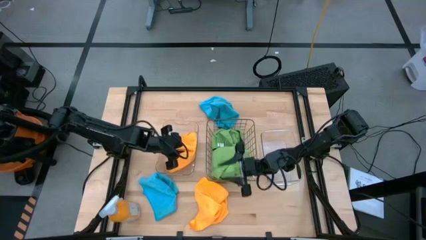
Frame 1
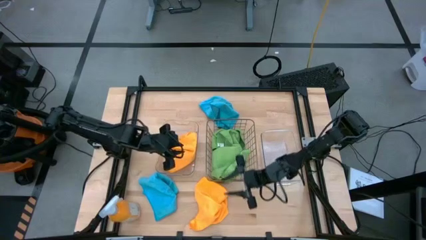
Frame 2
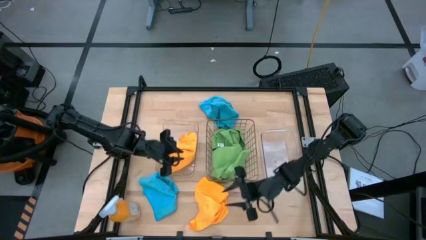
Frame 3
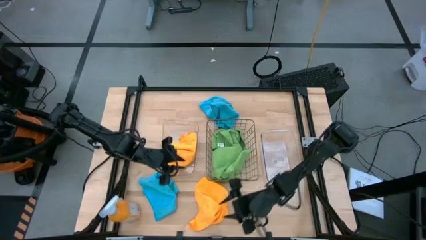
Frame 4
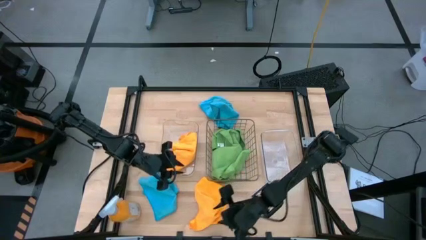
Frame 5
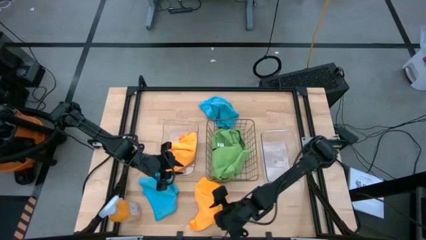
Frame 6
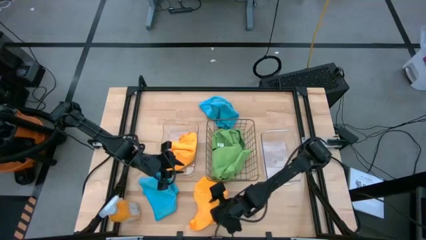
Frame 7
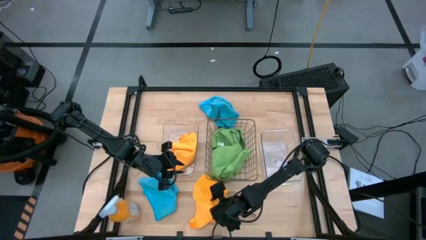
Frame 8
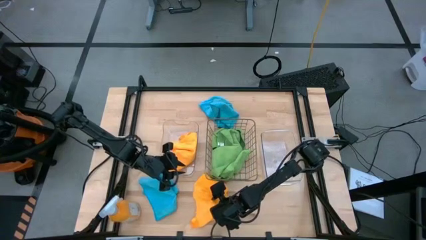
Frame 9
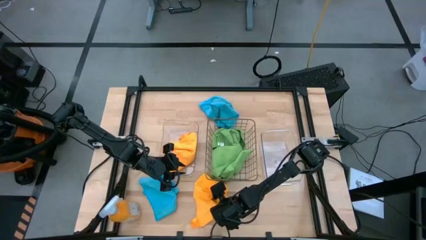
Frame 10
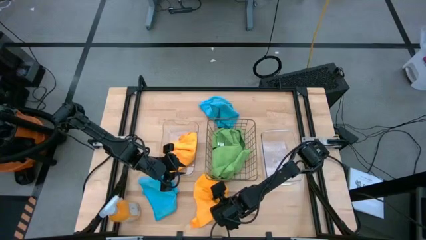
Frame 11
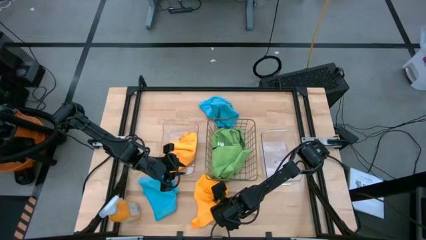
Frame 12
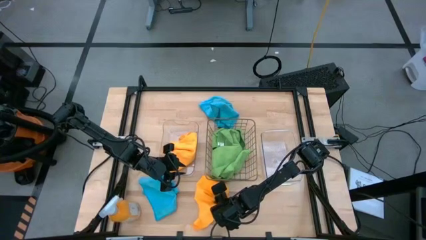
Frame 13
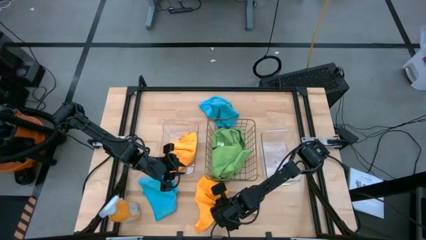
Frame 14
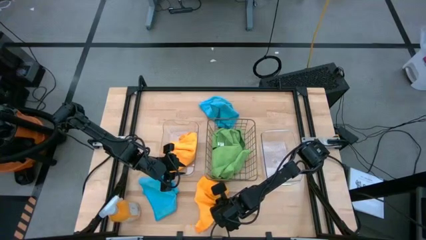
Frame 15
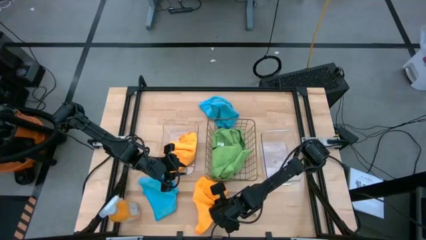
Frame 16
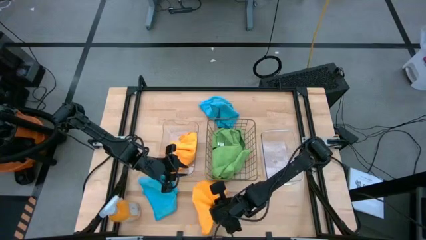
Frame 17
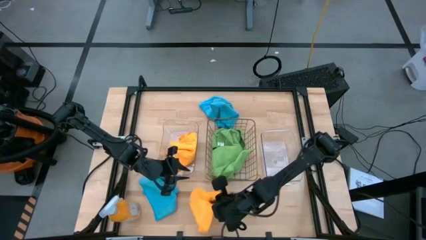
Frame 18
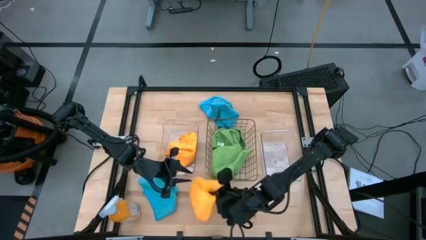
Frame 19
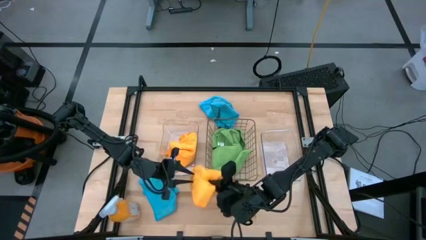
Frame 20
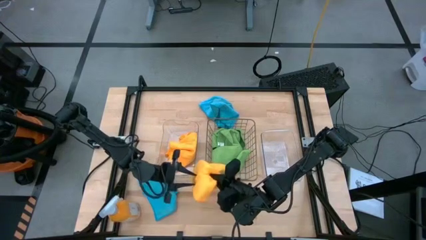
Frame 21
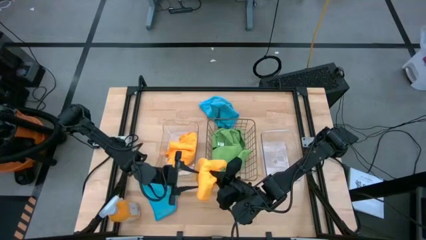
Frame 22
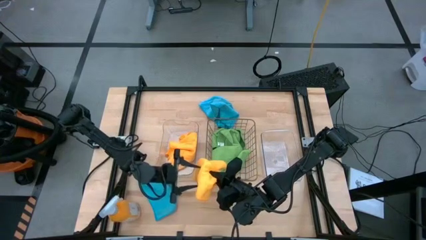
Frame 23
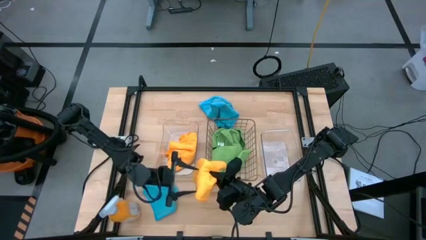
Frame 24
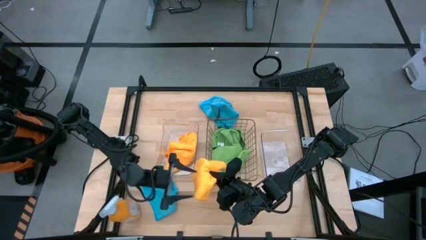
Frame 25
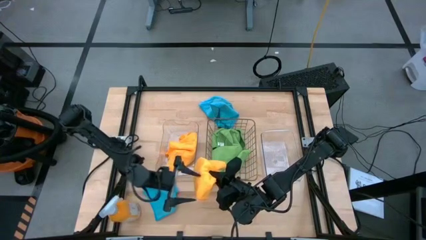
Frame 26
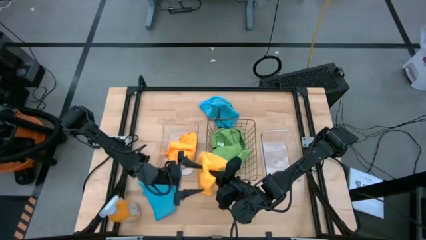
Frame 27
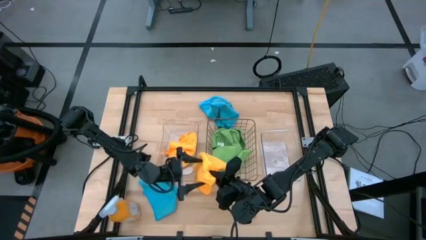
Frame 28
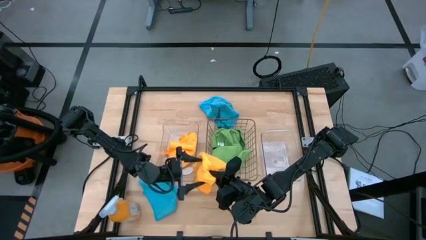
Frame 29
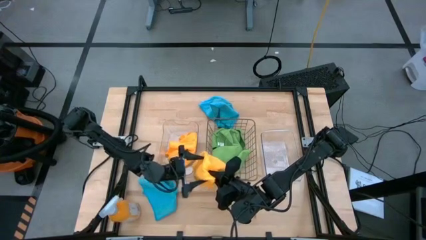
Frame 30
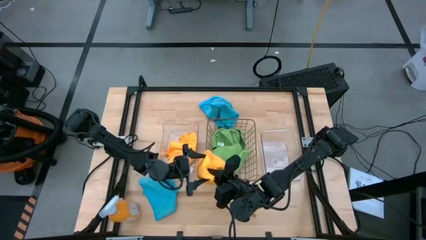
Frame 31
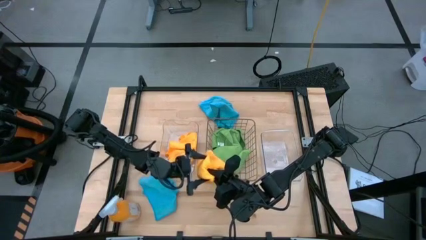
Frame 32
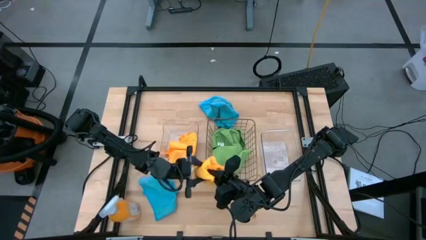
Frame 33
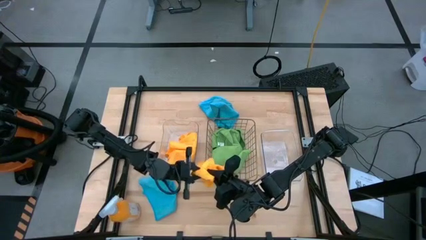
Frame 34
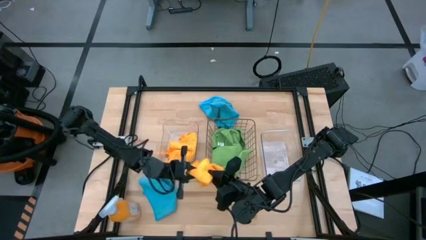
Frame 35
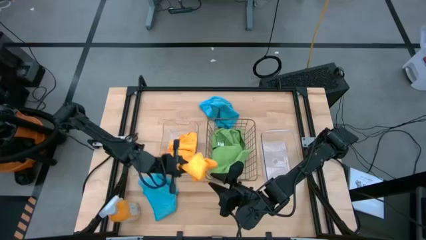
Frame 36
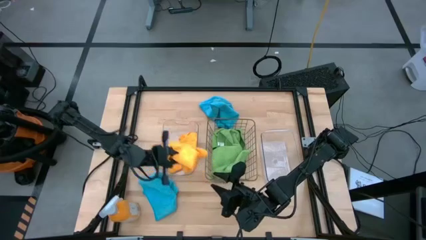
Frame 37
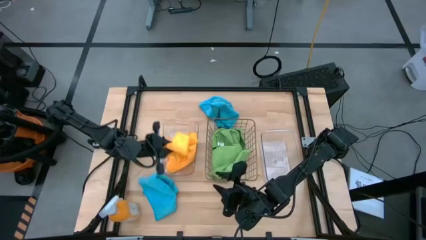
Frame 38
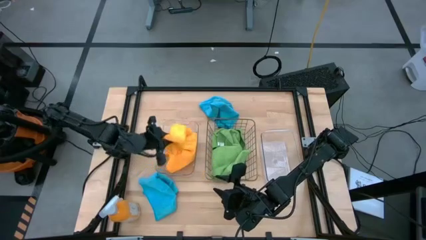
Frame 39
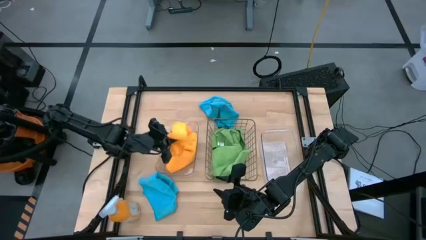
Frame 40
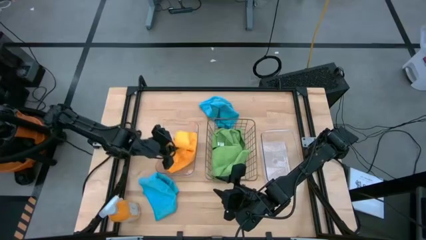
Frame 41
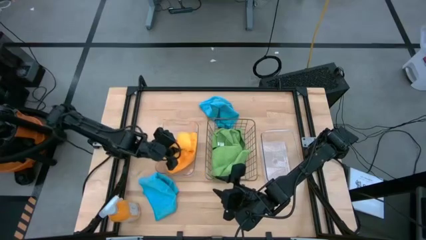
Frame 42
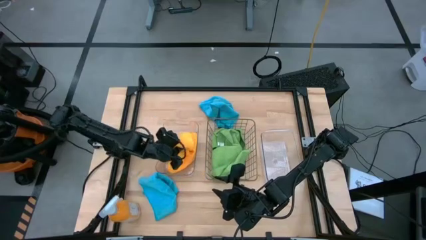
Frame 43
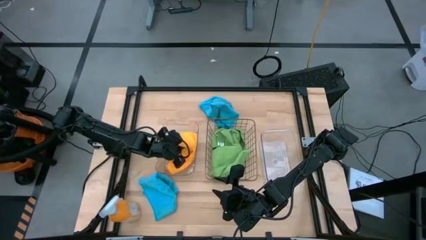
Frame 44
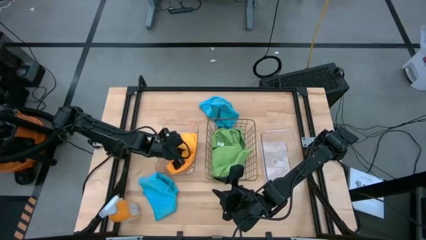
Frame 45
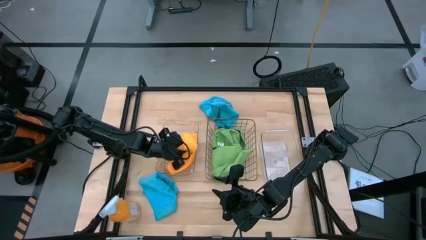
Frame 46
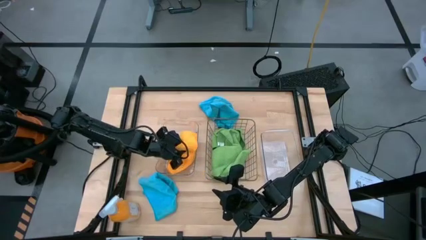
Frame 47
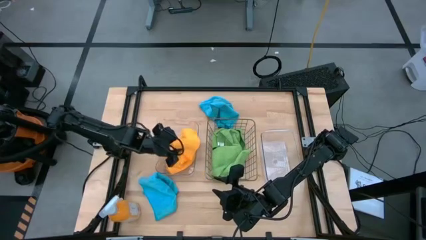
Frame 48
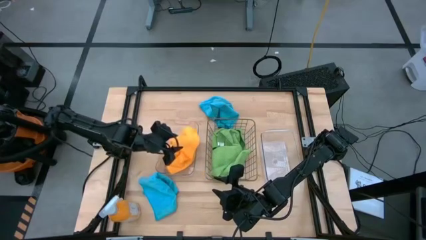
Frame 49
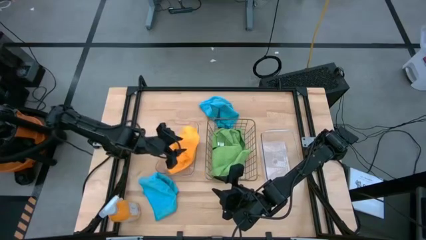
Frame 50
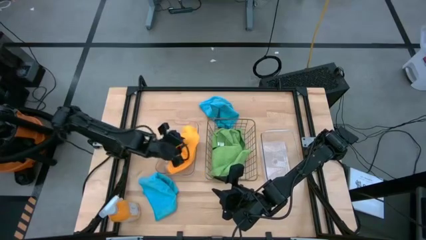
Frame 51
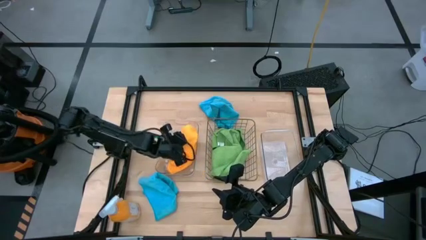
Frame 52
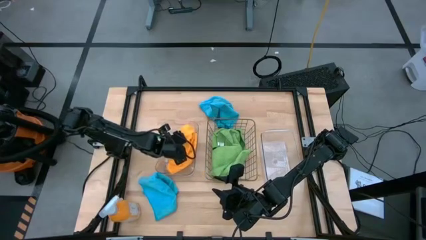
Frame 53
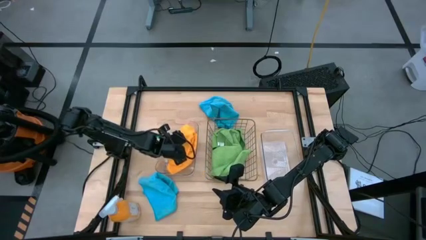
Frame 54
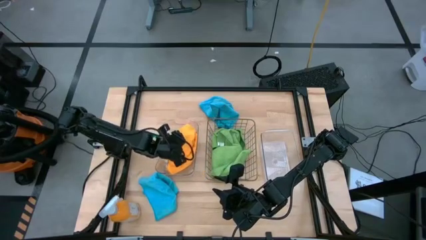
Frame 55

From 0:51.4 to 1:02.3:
Task: Sort microfiber towel by color & place in baskets
Put the yellow microfiber towel into the left transparent bin

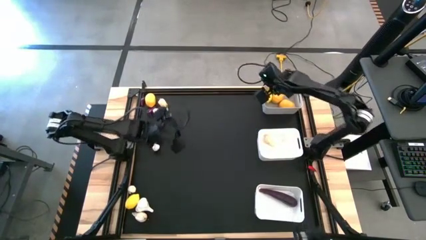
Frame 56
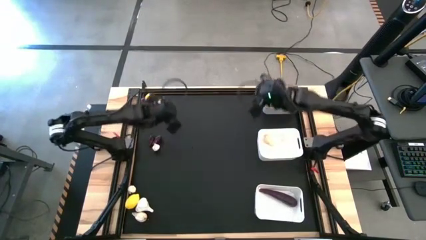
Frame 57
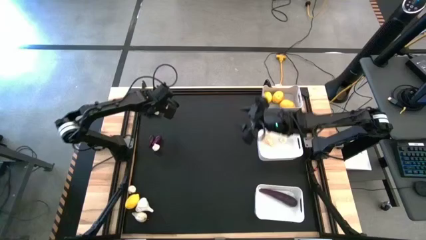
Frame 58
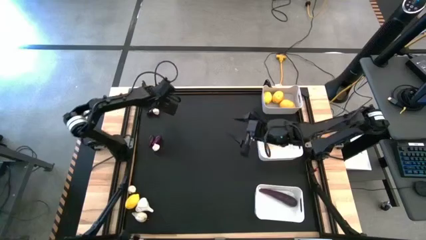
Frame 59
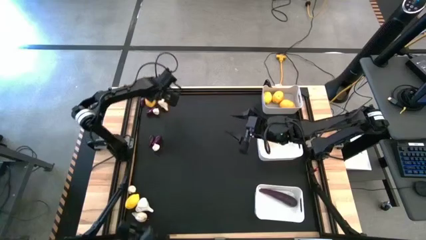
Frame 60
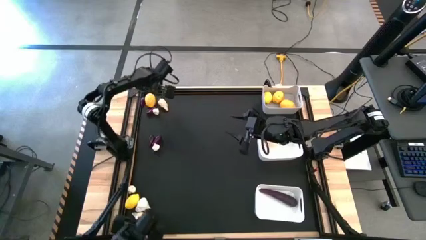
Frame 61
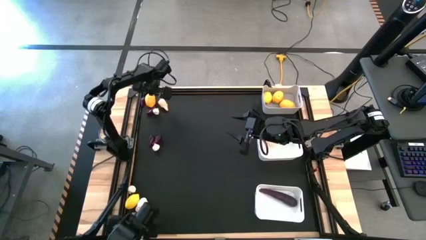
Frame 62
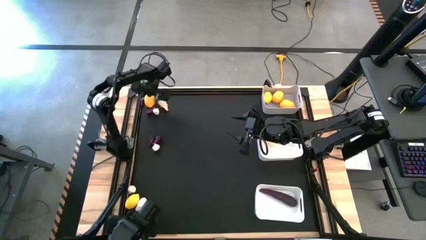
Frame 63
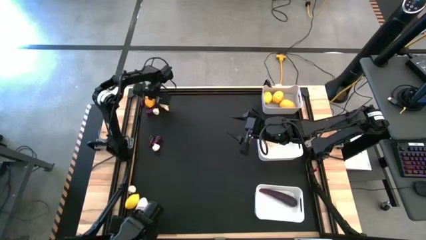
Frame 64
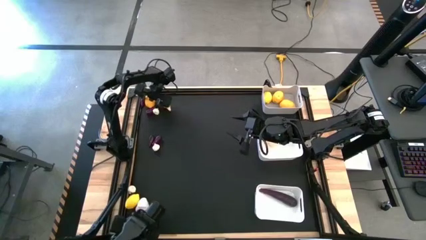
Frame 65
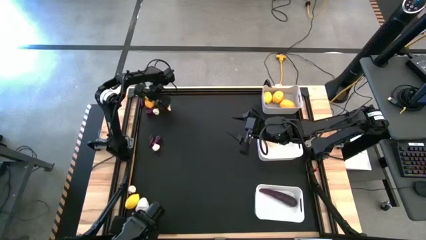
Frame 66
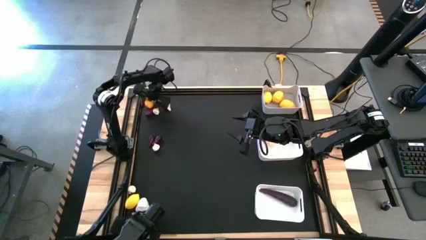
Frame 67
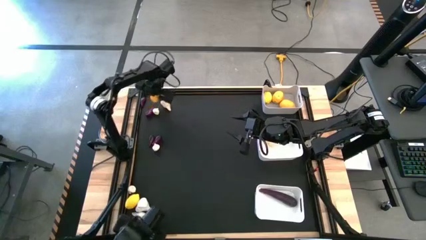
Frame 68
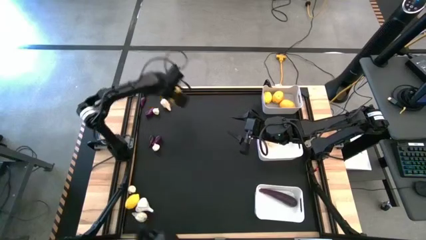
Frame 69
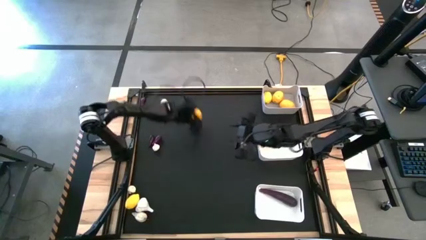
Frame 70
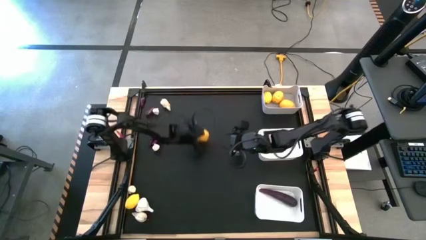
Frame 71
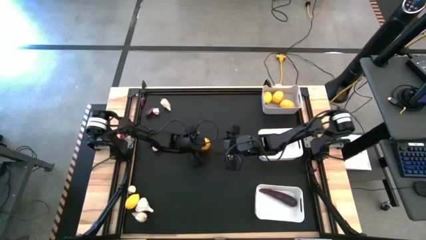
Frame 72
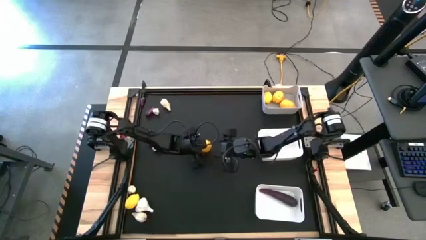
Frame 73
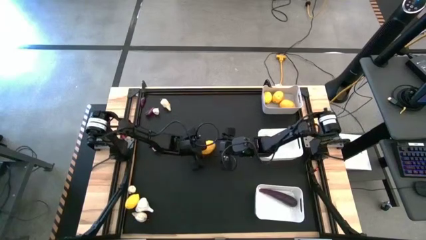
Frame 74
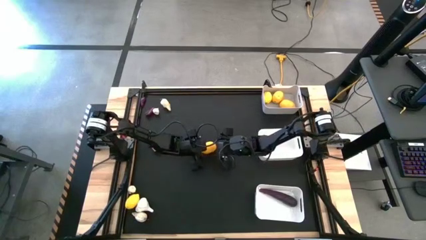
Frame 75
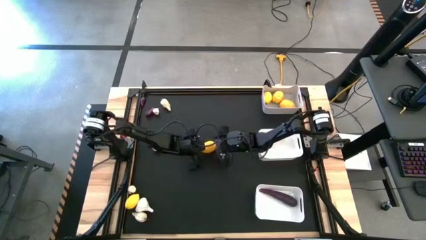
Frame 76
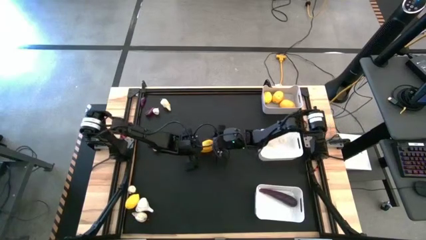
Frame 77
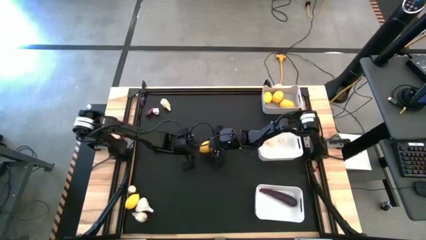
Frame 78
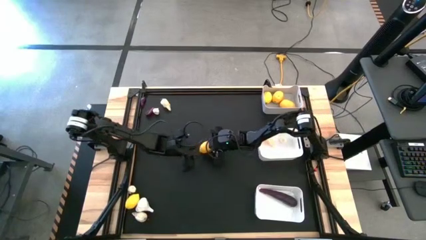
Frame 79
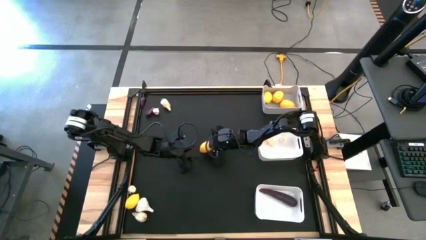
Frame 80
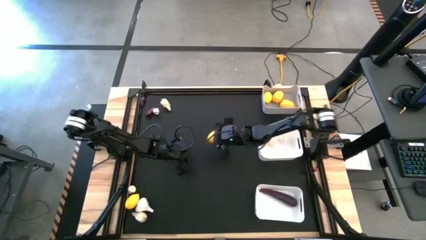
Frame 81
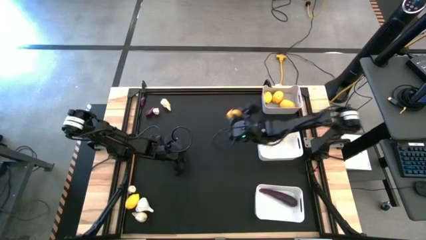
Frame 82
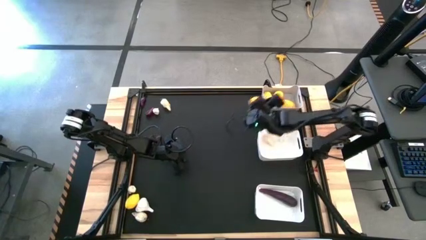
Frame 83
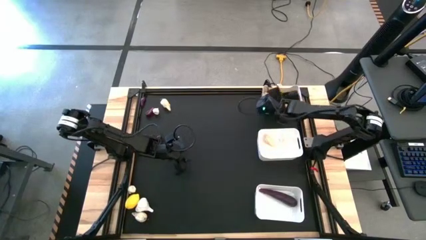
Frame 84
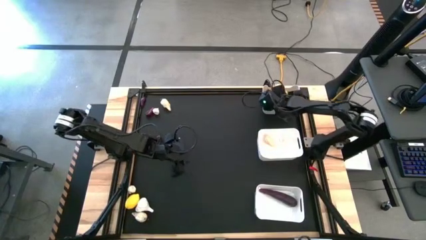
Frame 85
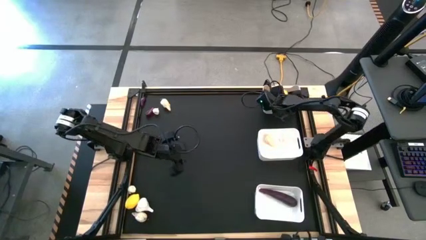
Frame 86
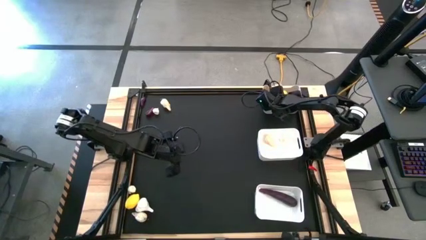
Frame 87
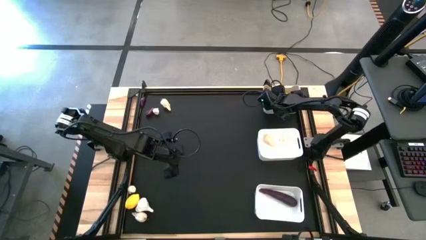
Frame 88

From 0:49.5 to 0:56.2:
Task: Sort produce into baskets
Put the lemon into the gray bin
